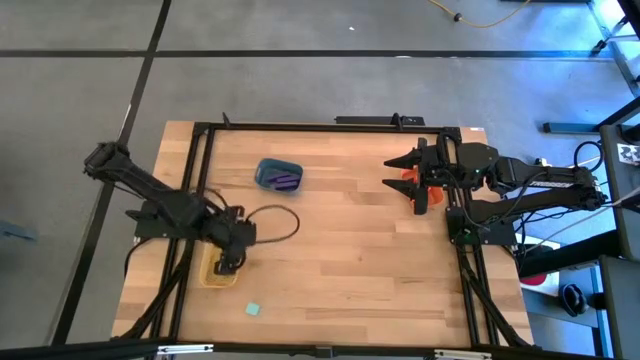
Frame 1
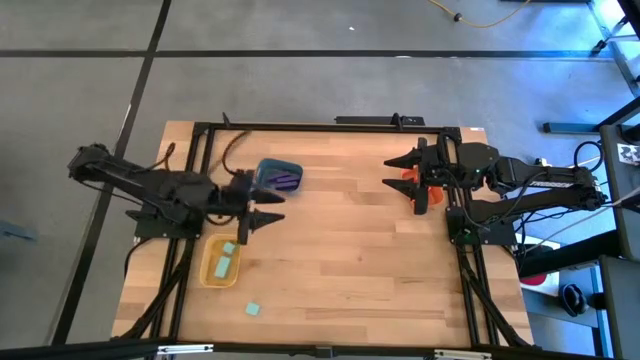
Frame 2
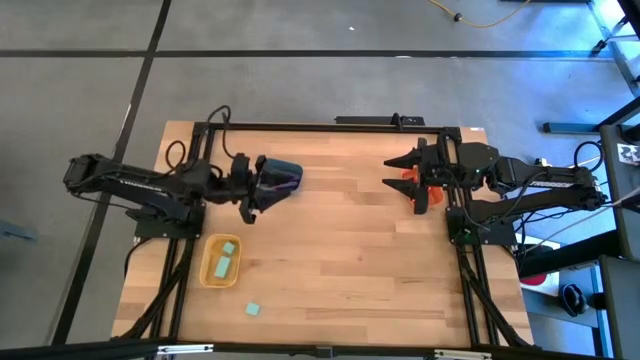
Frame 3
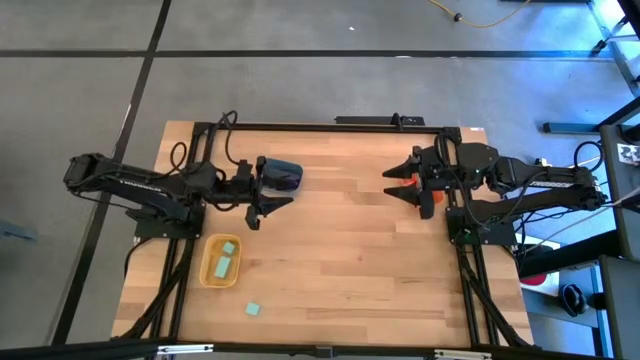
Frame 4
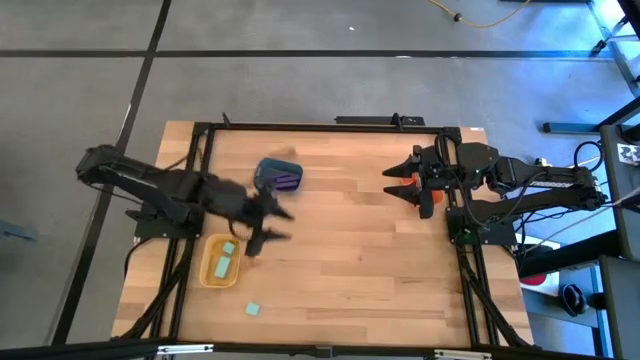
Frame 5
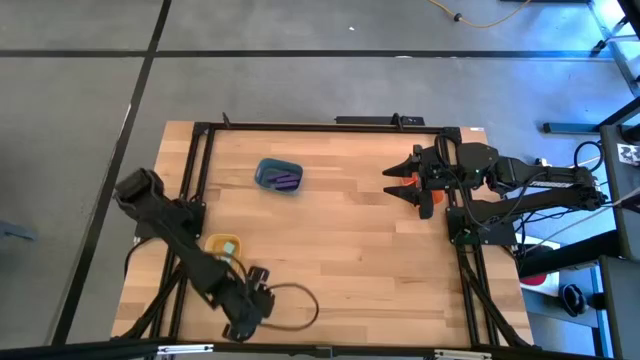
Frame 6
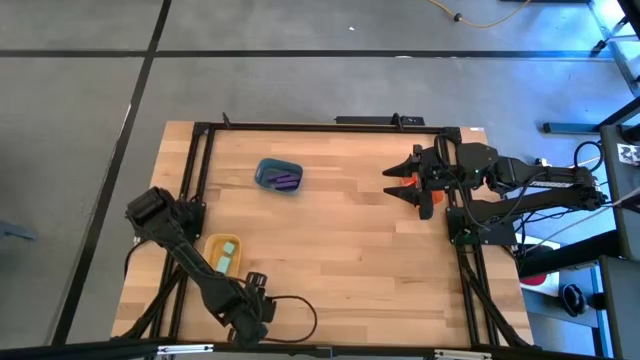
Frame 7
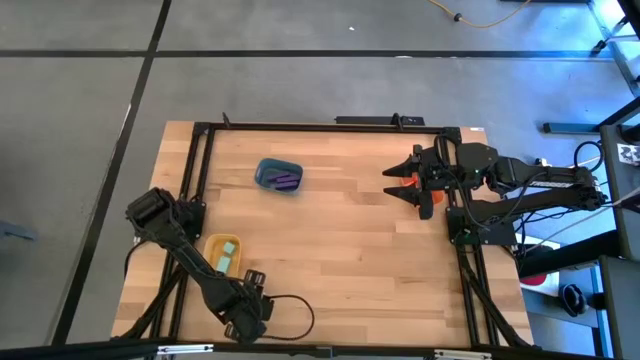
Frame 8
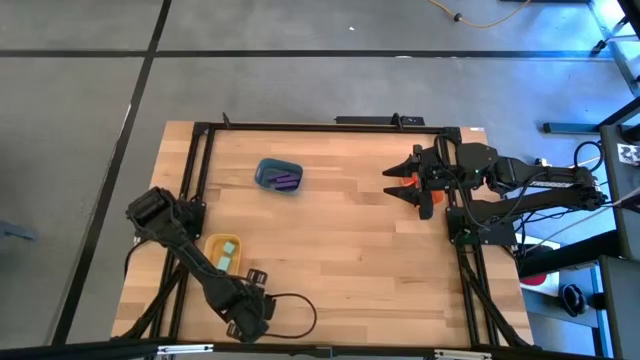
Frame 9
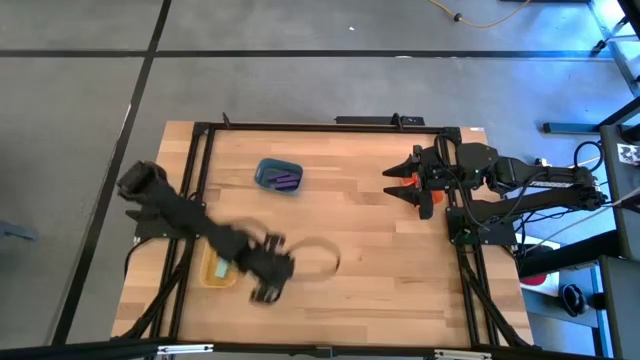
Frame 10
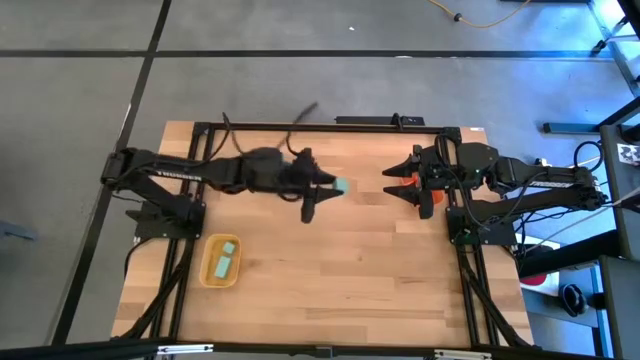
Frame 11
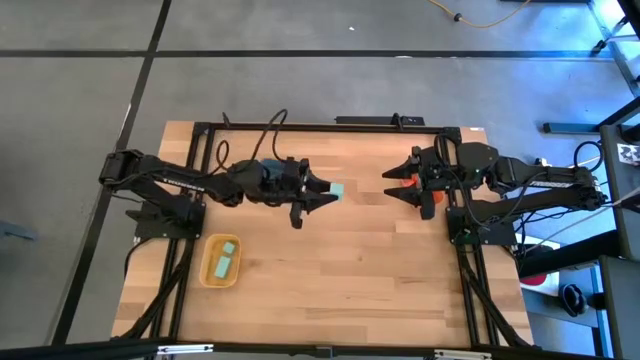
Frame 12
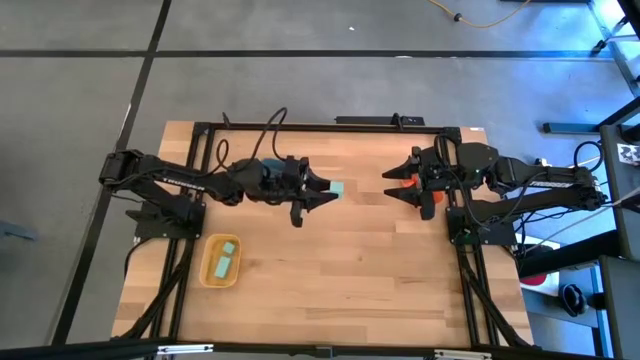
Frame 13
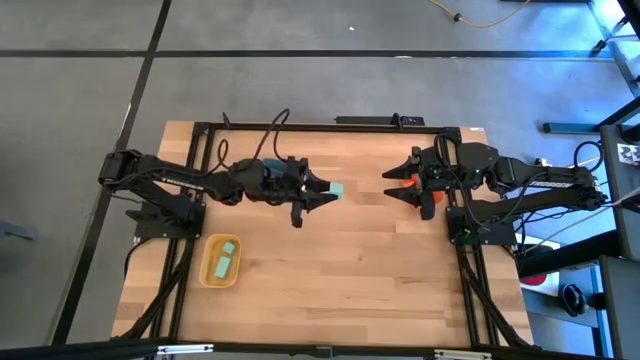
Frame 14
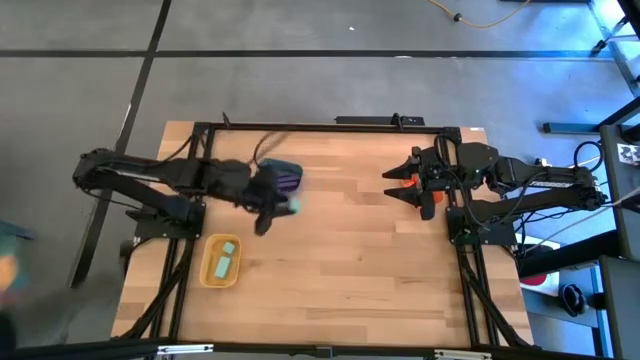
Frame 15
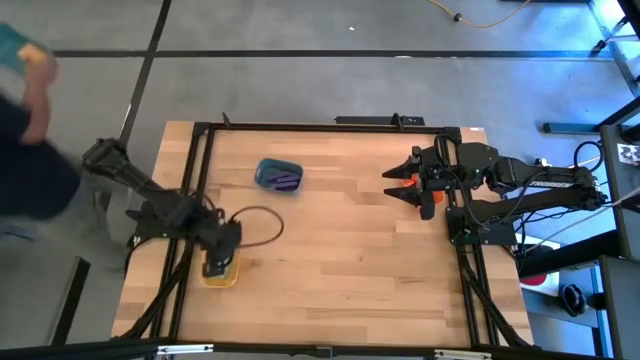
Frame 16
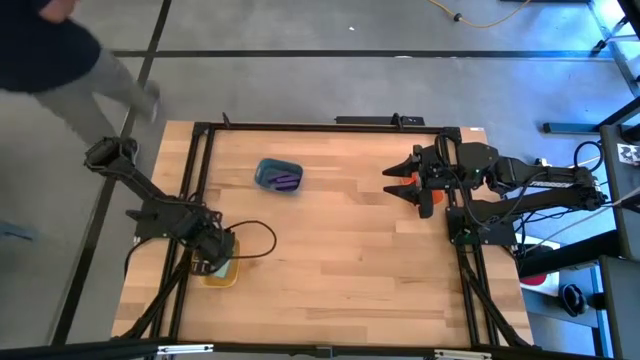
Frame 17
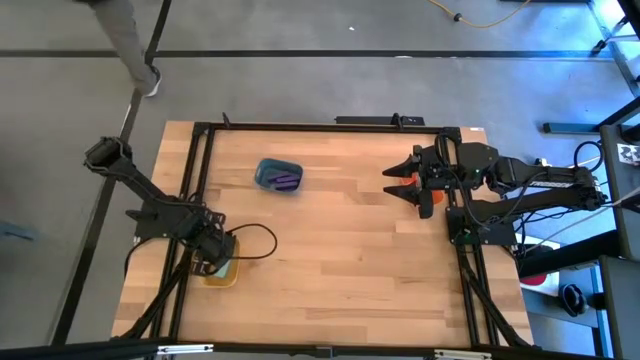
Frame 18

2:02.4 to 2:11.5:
Task: Sort & place blocks by color
Put the blue block into the yellow bin

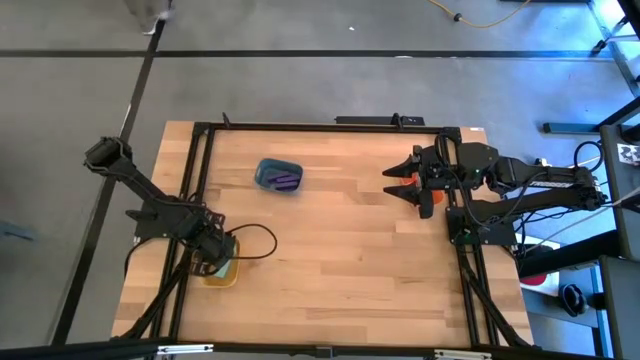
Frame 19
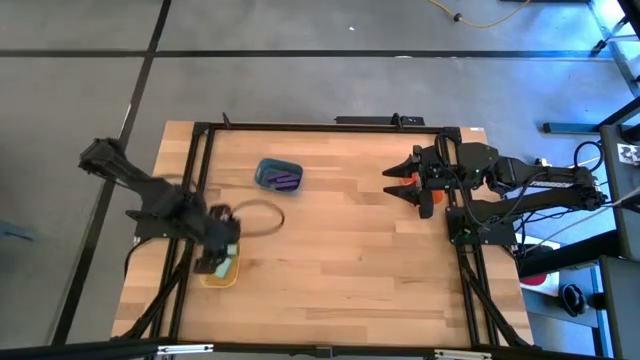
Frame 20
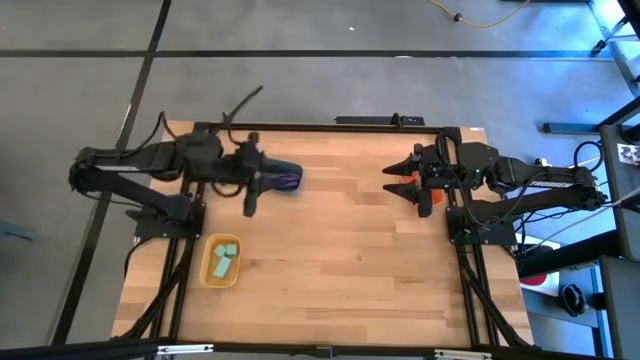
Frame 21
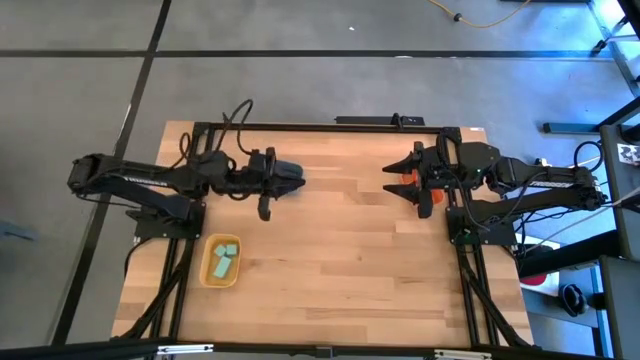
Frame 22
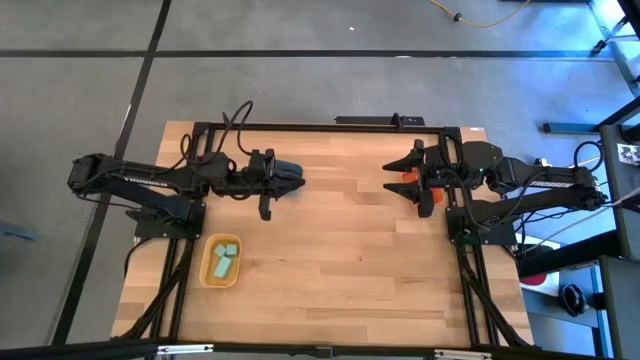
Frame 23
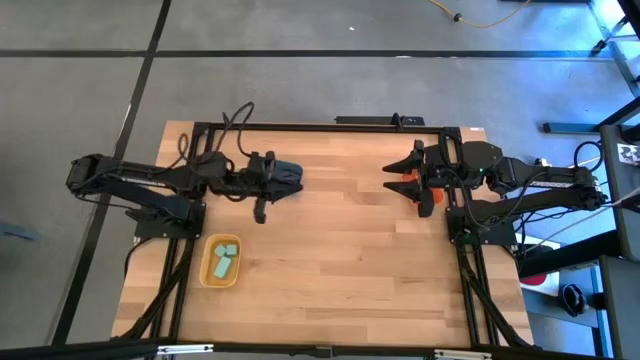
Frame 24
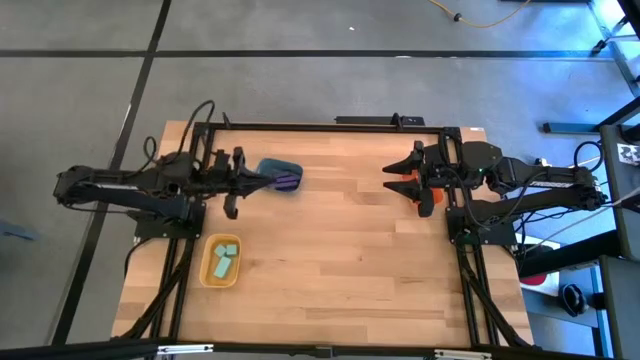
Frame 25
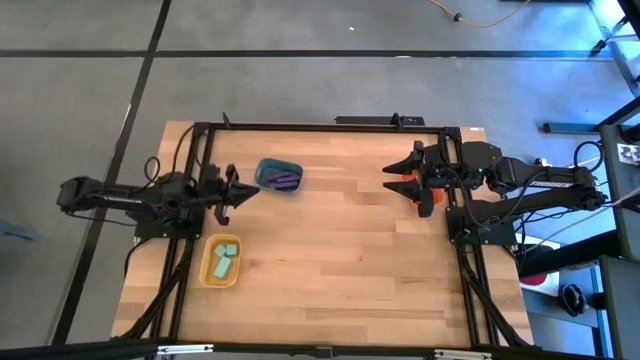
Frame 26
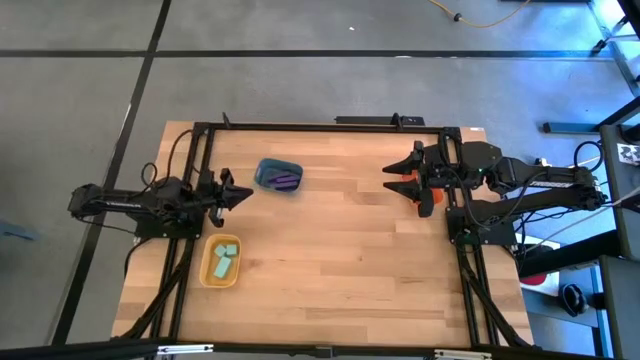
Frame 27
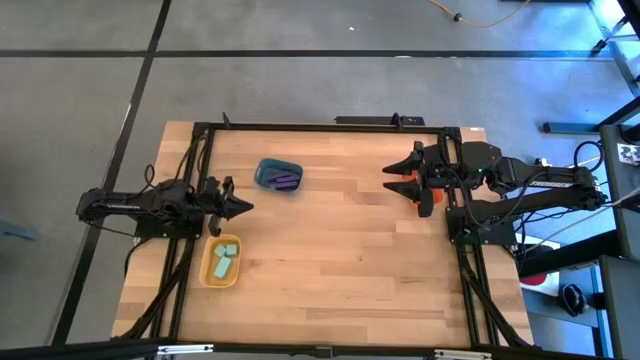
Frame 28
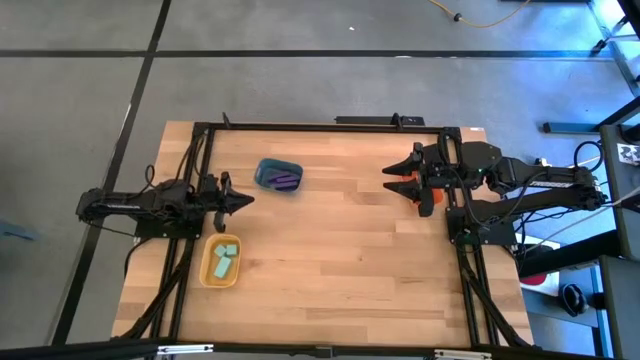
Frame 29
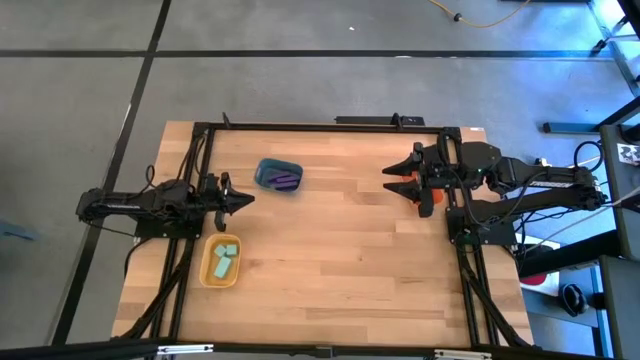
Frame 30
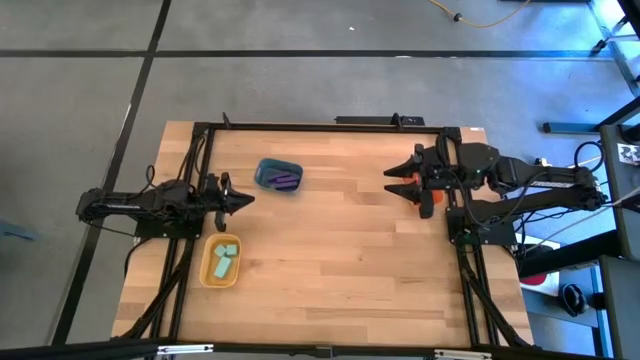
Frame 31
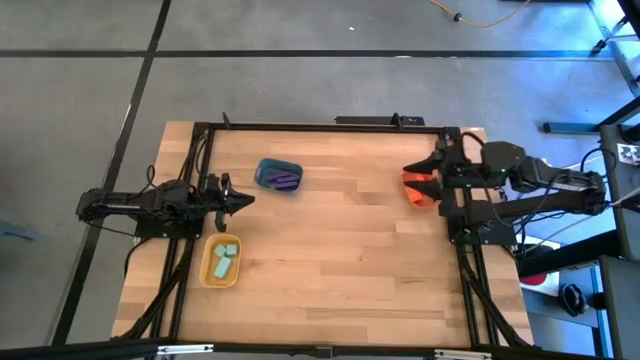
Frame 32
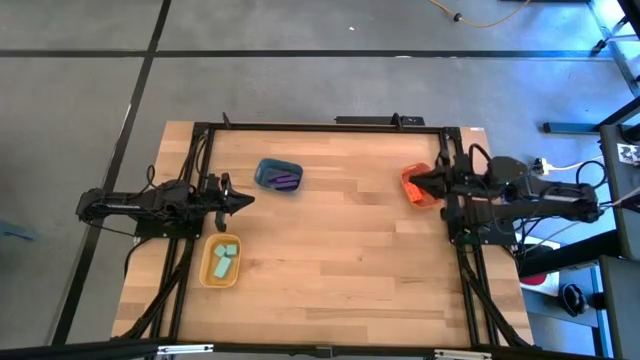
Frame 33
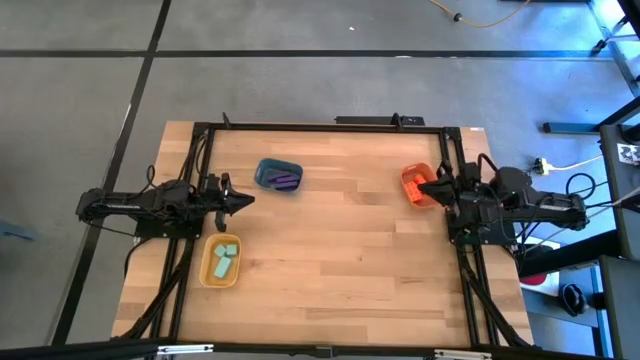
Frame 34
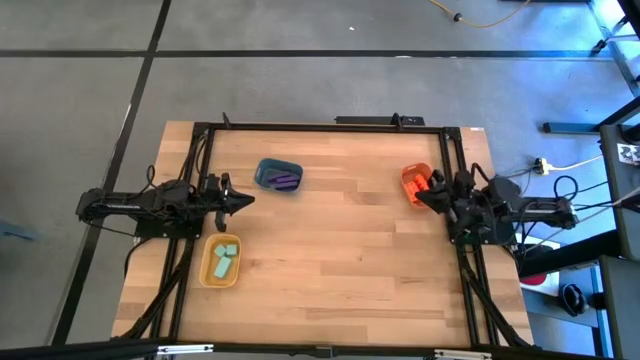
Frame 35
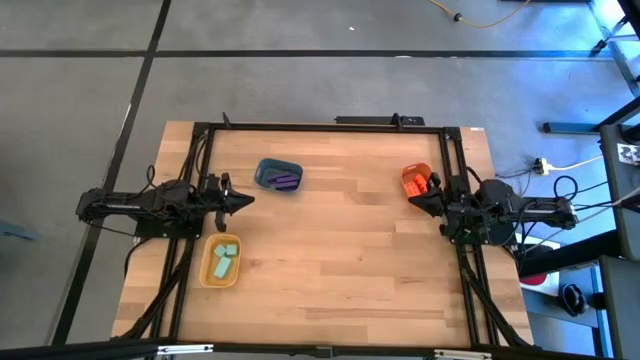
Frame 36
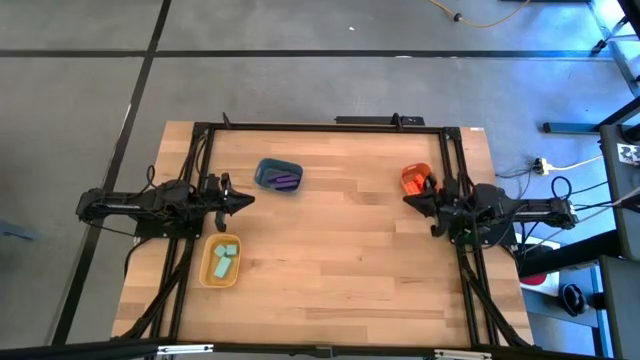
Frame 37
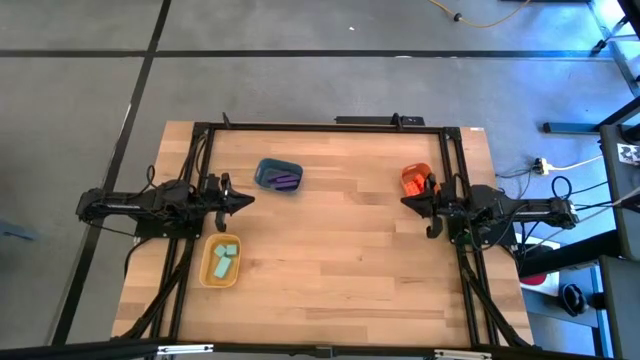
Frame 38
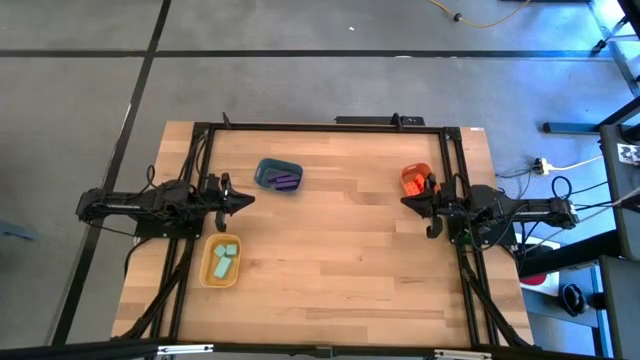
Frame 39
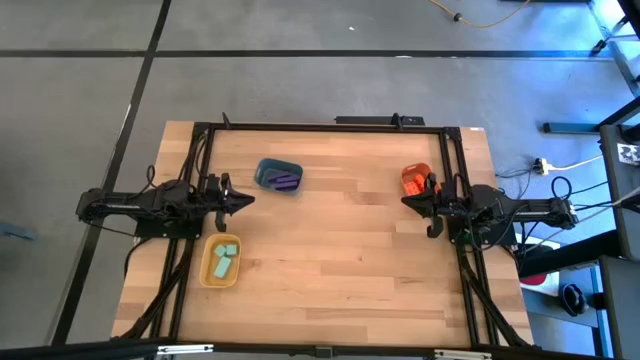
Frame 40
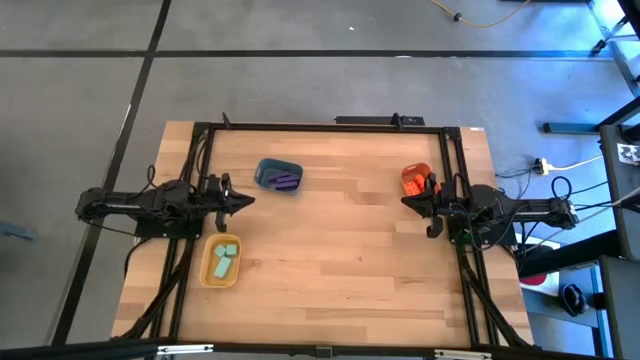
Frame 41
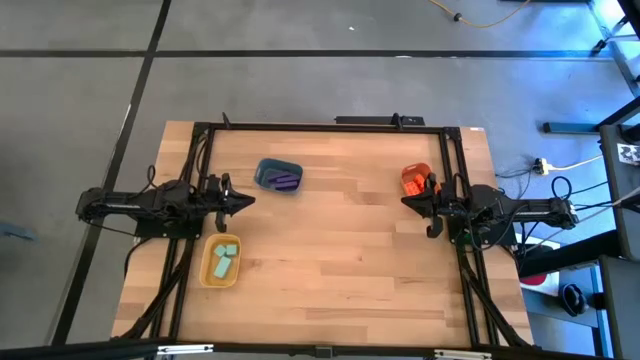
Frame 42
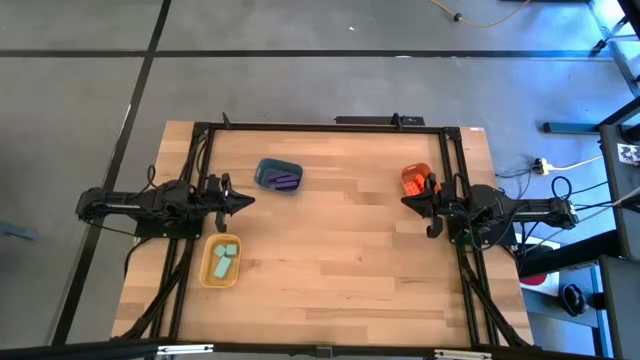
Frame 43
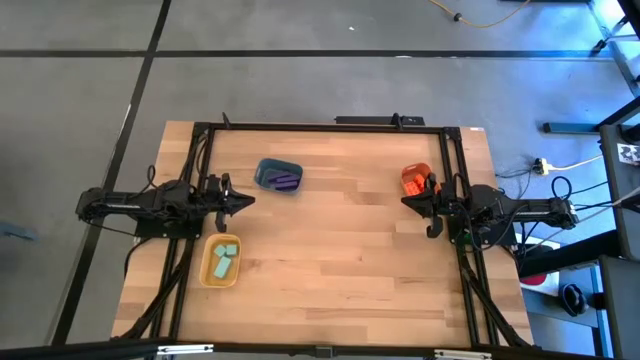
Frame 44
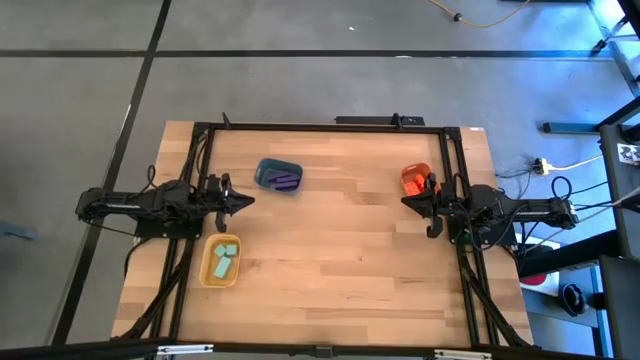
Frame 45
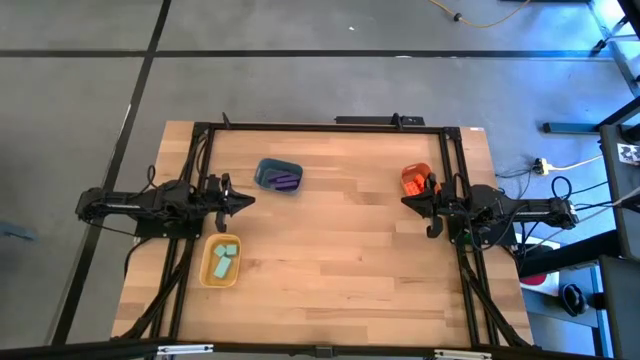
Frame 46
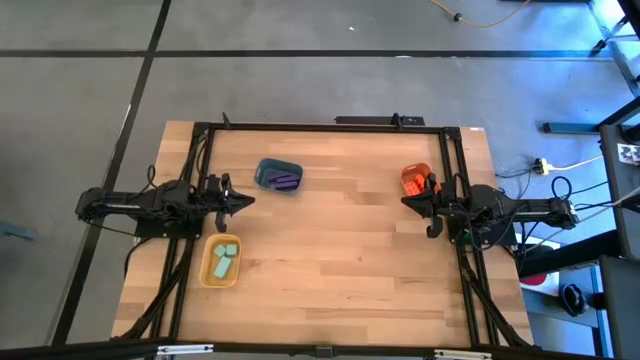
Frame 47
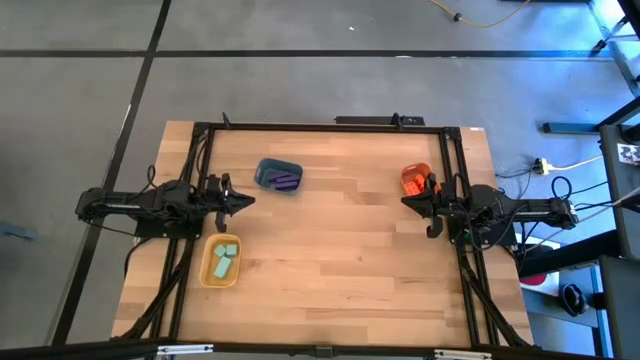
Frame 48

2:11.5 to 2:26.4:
Return to Home Position
